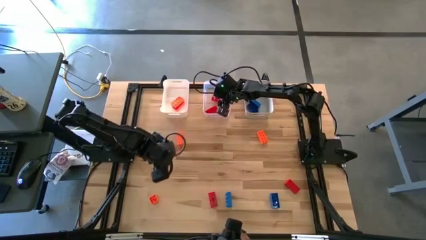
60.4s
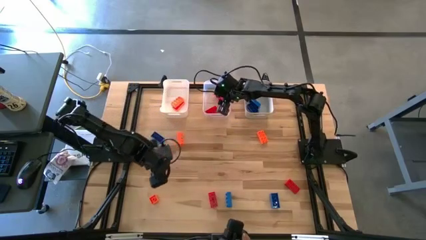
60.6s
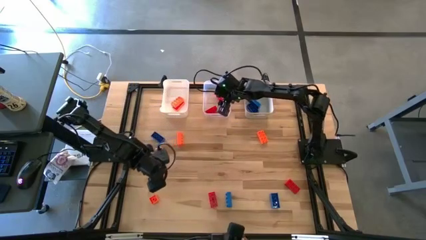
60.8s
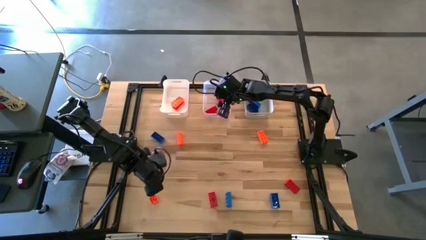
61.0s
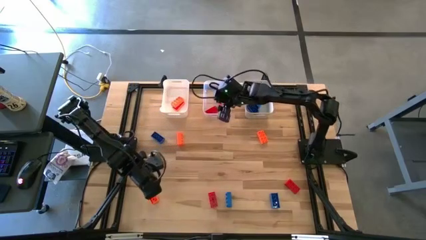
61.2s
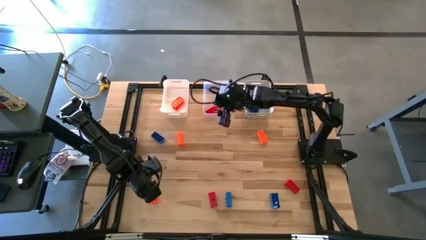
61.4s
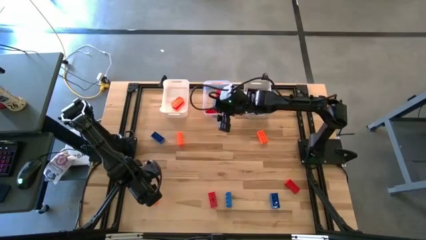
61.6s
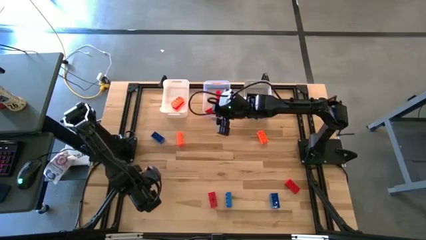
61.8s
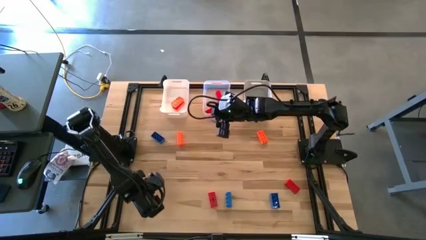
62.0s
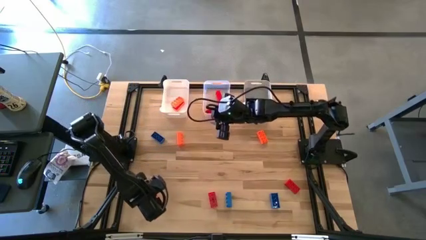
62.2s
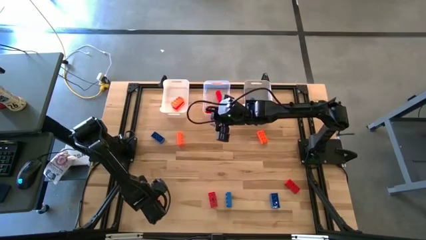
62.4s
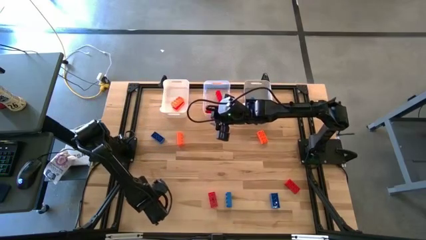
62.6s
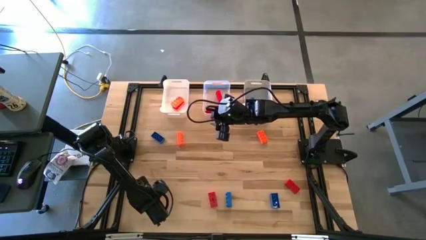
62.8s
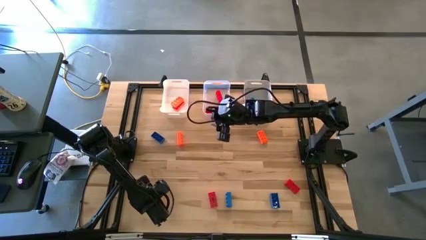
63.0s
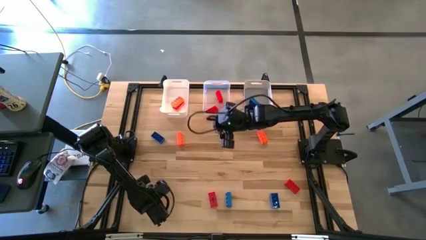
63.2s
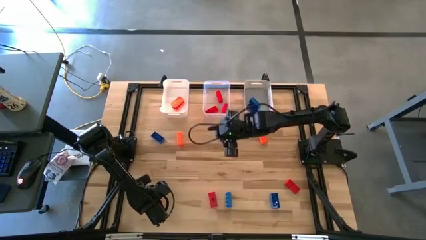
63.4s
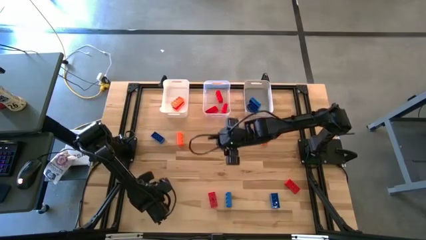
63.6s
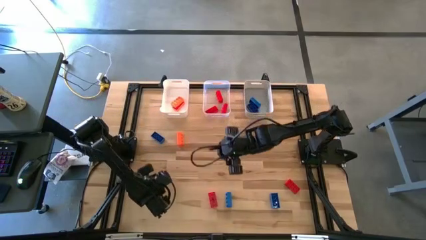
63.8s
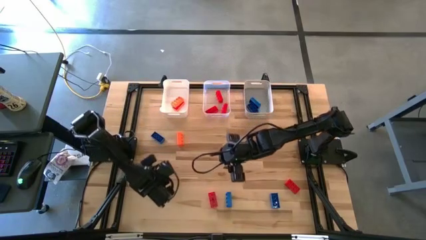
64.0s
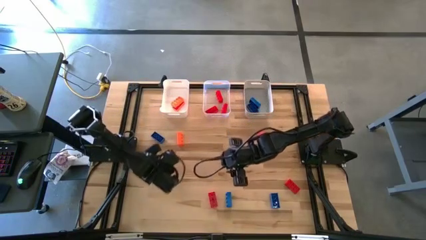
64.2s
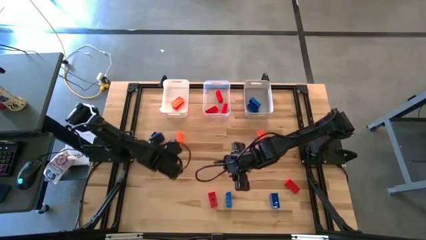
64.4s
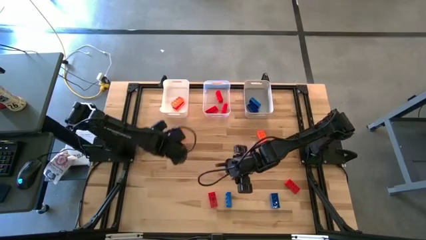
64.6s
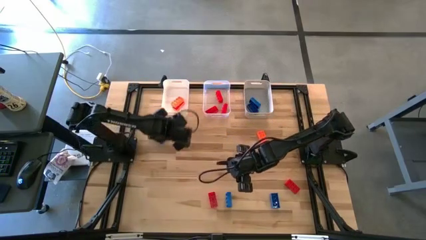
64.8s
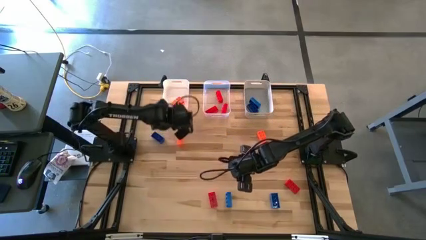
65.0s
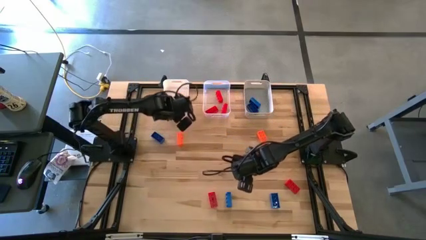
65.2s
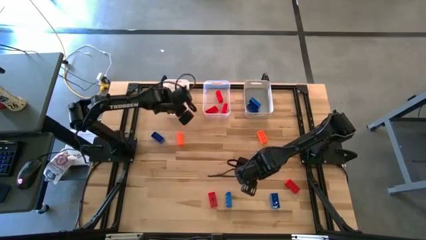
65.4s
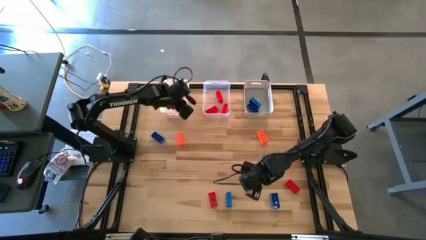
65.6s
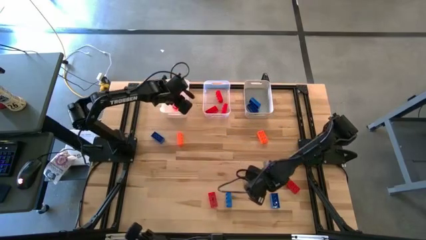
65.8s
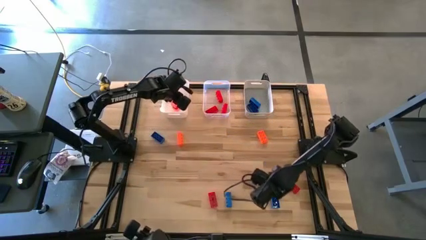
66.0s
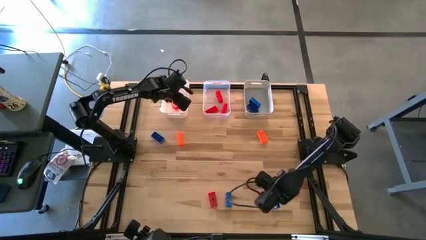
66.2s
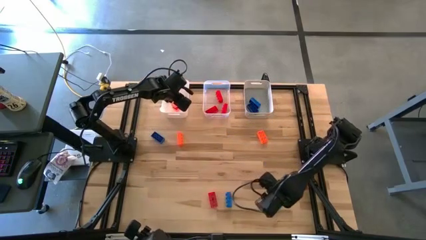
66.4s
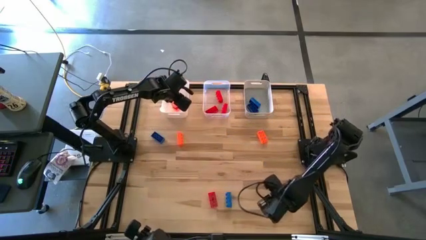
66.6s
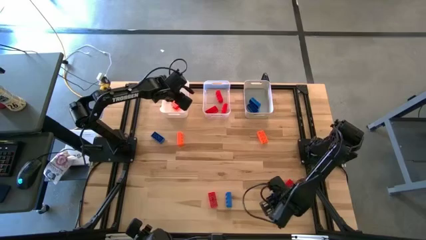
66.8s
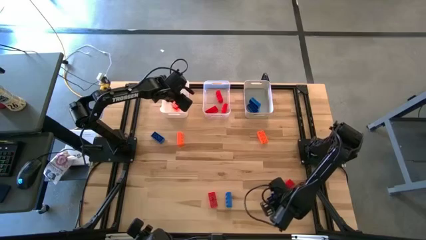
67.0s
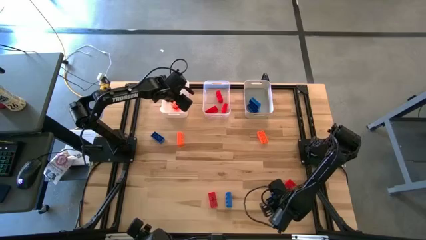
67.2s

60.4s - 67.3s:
Task: Sort & place blocks by color
Put the orange game piece into the white bin

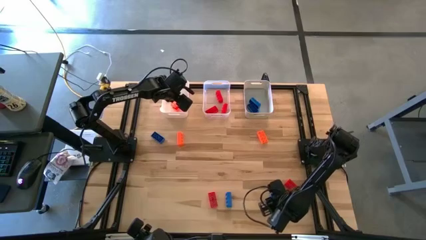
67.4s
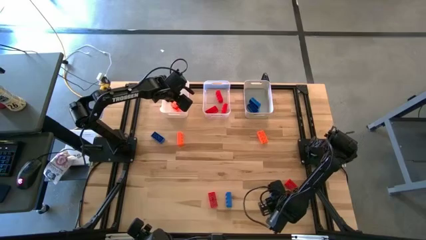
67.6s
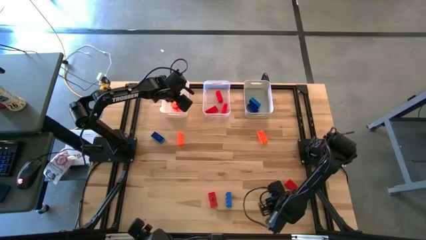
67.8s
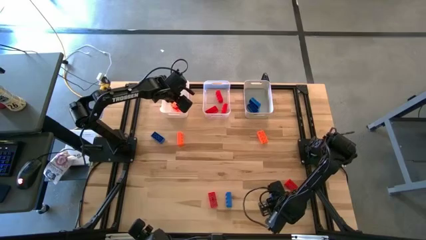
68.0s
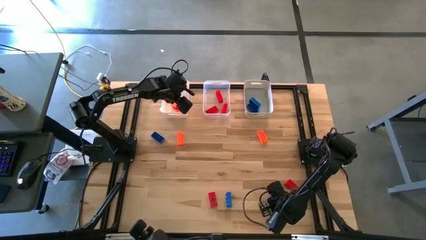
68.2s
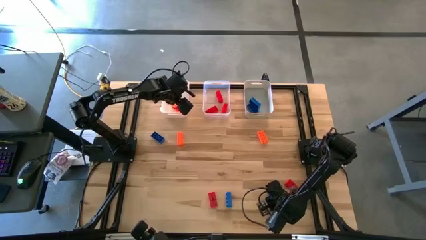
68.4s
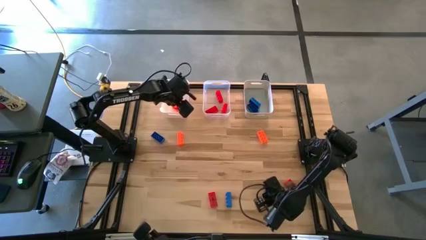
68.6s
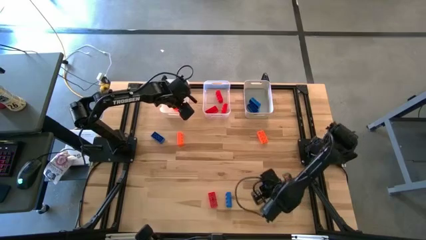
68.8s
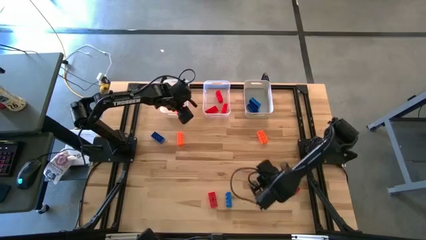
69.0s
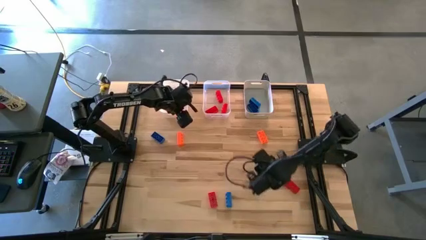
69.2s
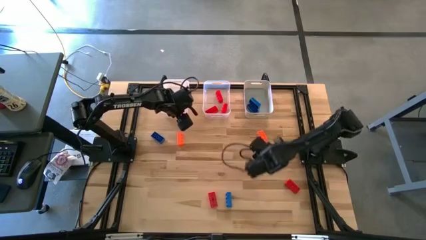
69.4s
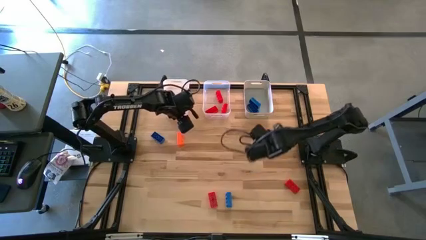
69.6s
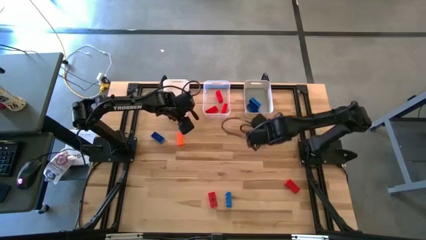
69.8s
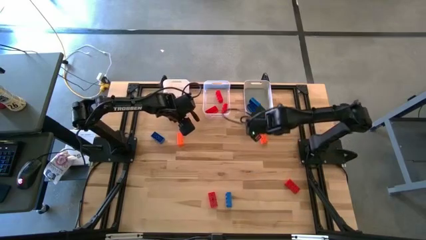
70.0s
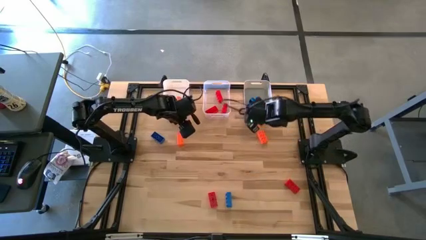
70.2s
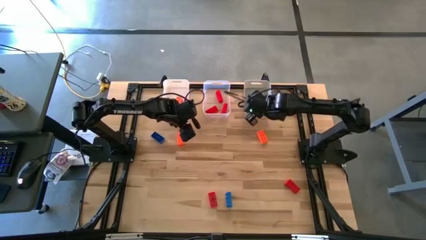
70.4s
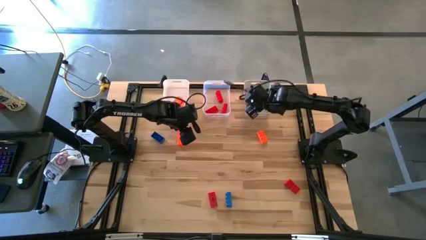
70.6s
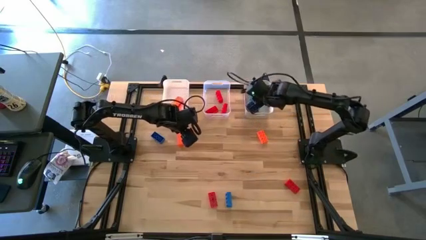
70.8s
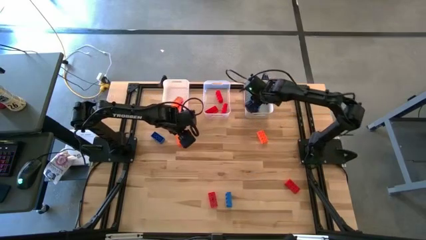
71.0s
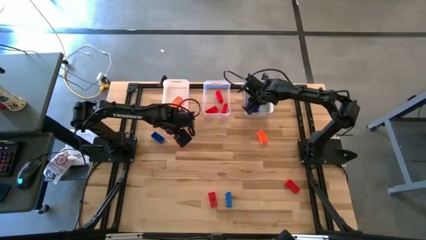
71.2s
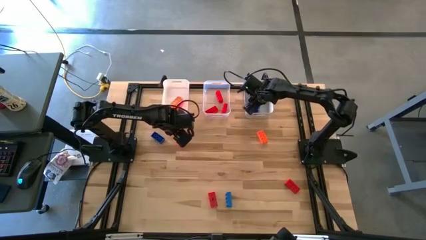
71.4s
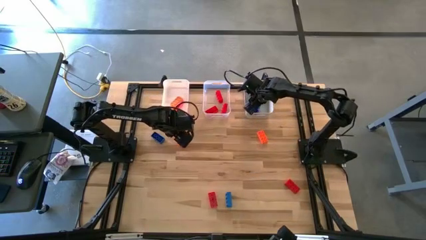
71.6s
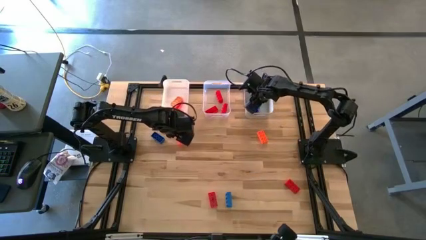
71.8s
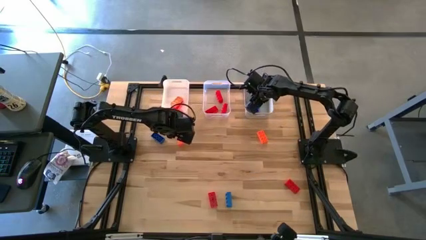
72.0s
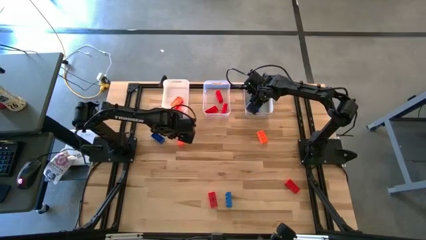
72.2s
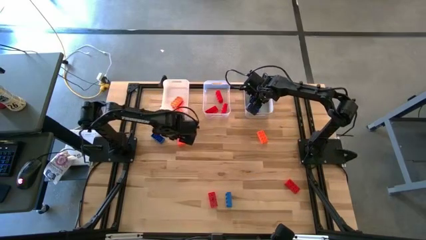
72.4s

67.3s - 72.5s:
Put the blue game piece into the gray bin

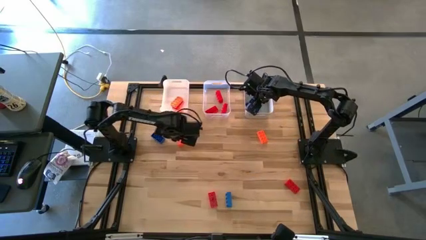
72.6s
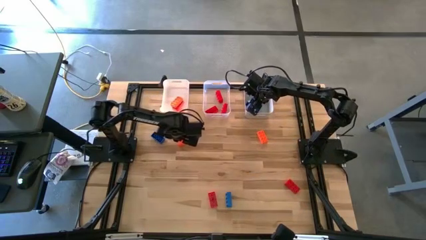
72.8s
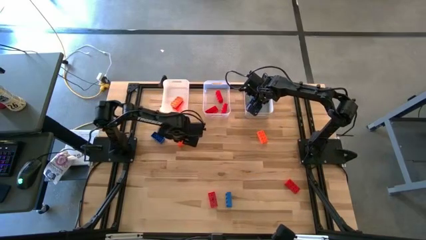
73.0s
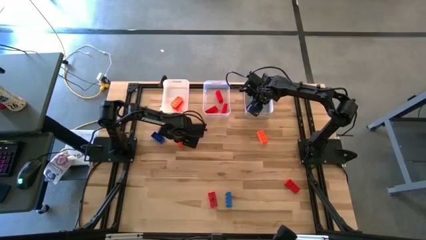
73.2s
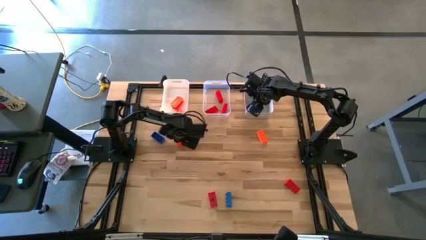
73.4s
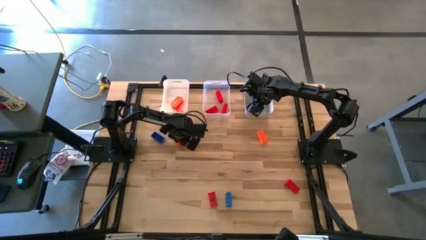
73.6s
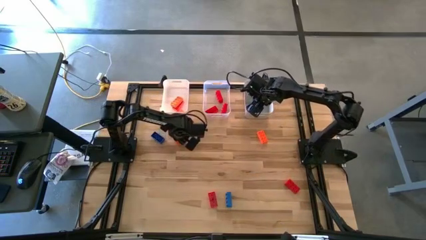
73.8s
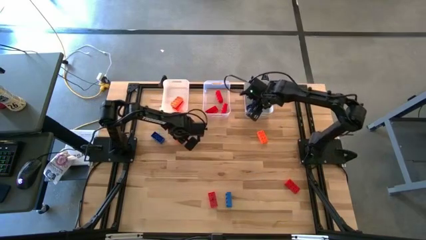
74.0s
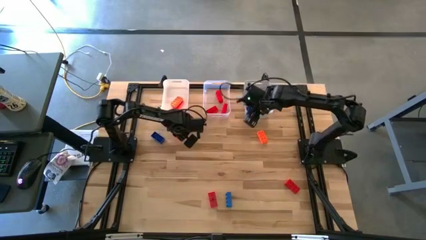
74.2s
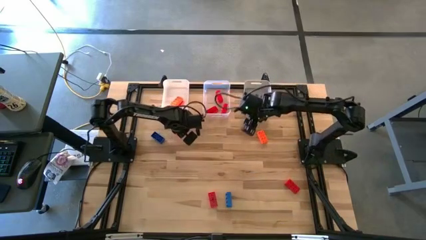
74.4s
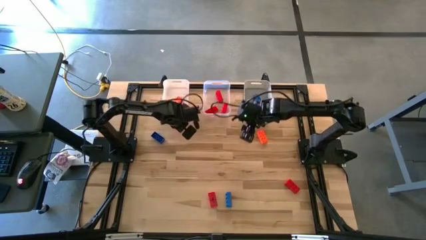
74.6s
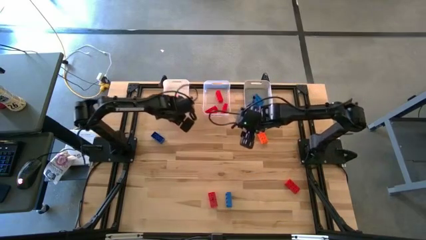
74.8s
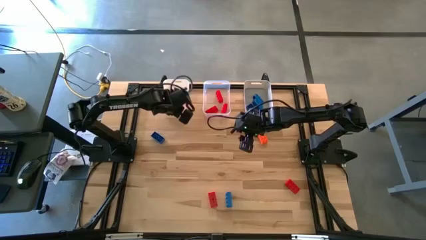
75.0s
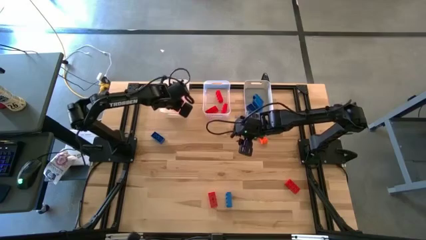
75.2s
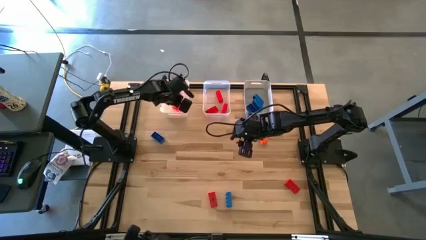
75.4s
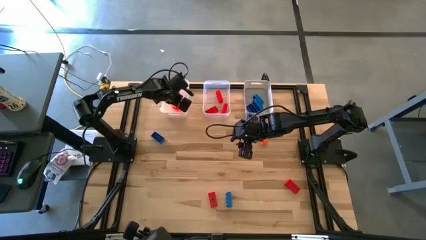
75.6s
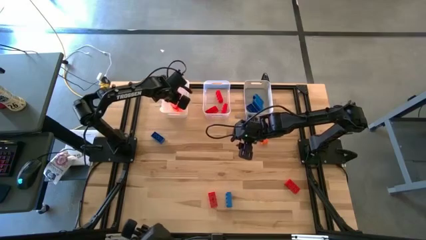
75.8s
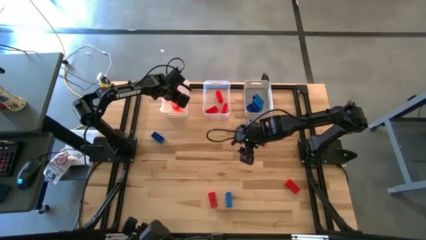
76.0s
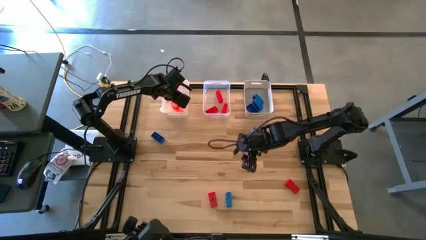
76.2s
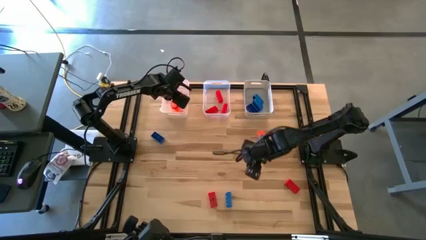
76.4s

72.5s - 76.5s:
Put the orange game piece into the white bin

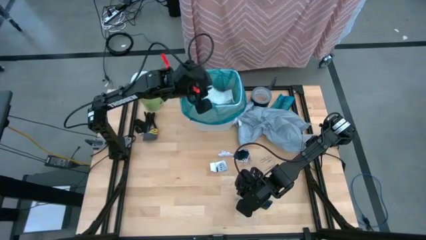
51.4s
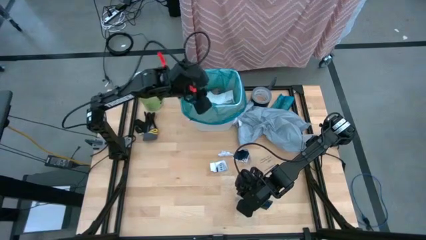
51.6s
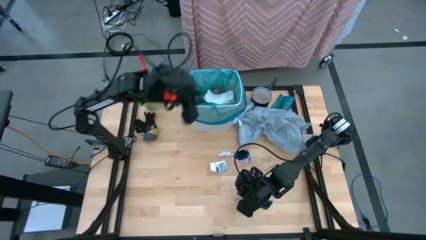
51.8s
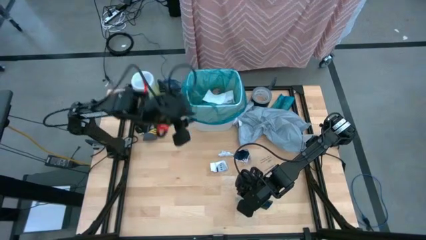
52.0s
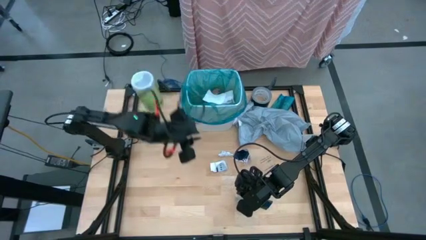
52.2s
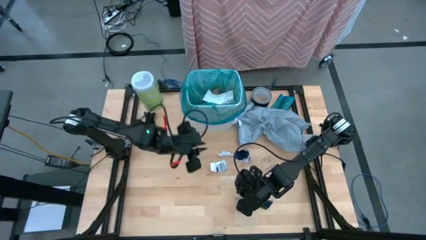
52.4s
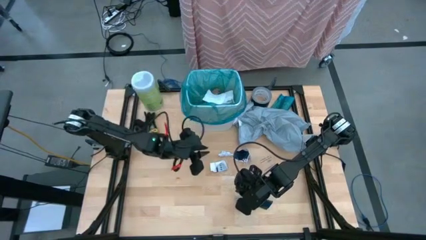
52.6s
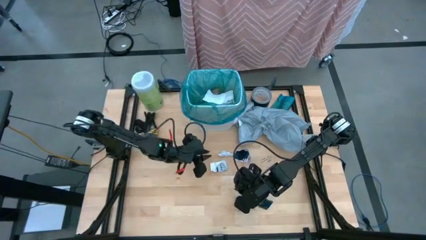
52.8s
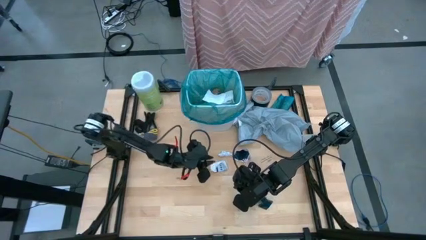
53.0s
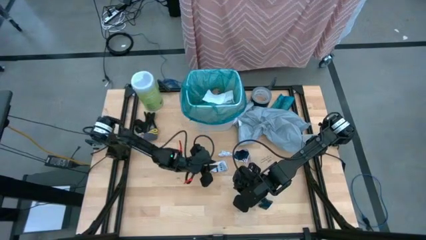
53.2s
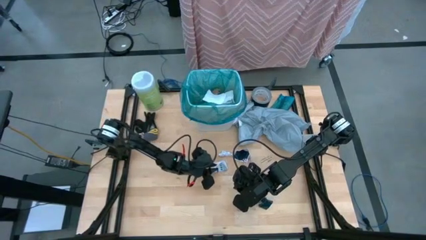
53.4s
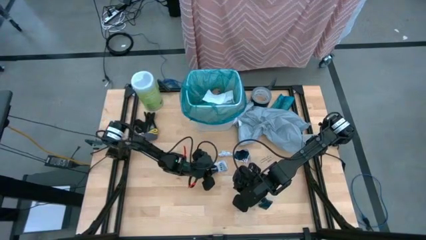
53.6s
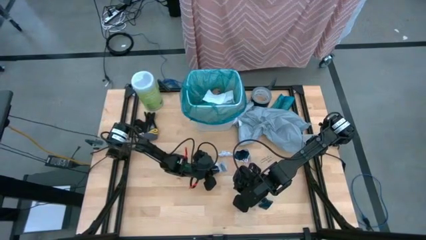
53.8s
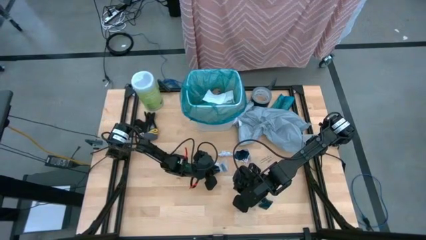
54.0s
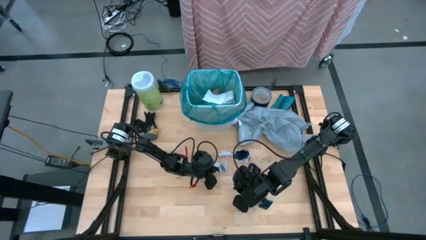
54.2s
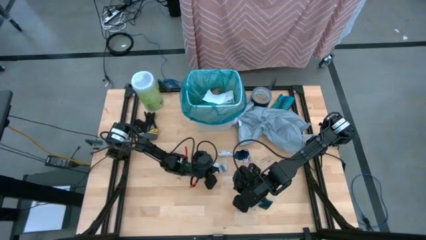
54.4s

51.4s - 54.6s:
Task: place trash/remove bag and relplace
Put the white paper into the trash bin
